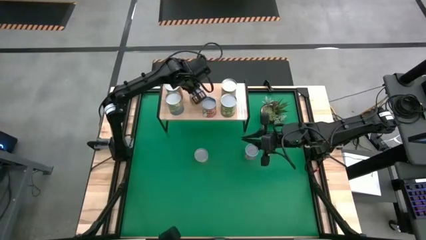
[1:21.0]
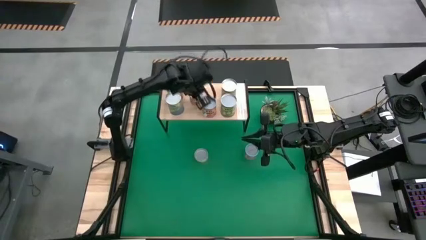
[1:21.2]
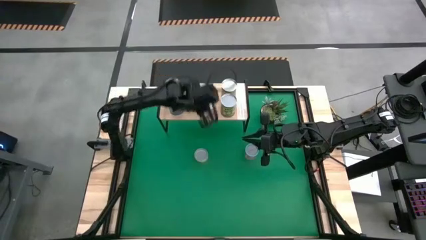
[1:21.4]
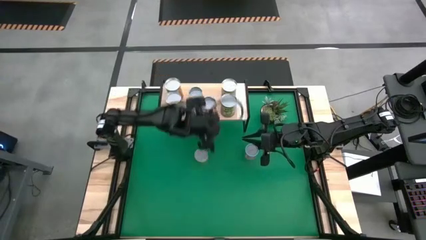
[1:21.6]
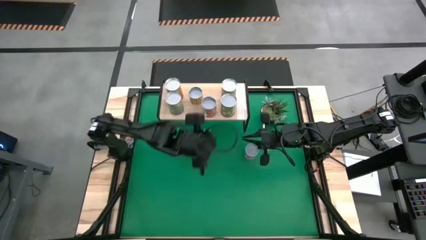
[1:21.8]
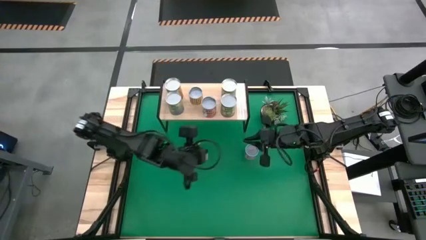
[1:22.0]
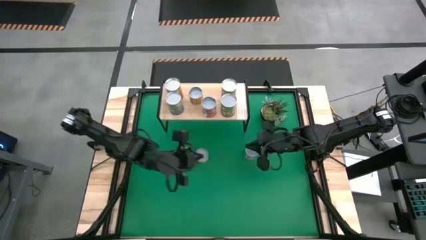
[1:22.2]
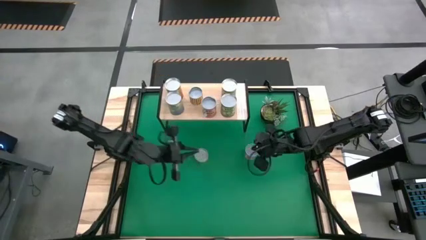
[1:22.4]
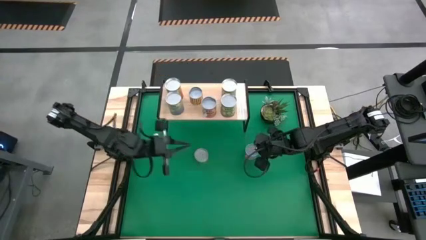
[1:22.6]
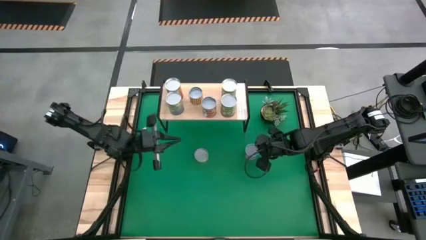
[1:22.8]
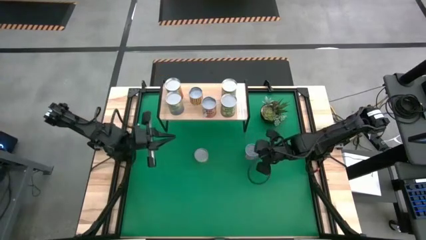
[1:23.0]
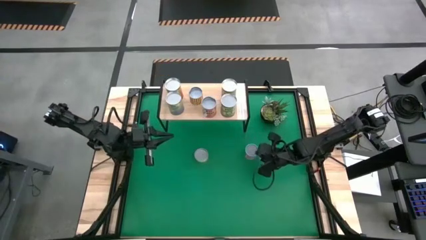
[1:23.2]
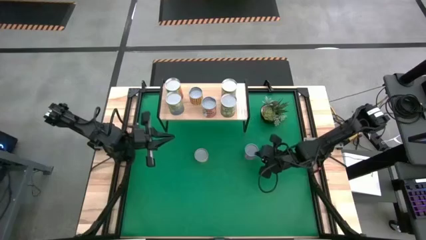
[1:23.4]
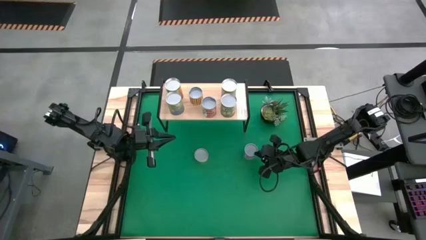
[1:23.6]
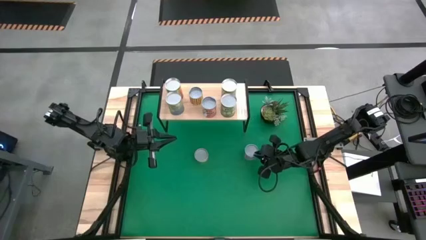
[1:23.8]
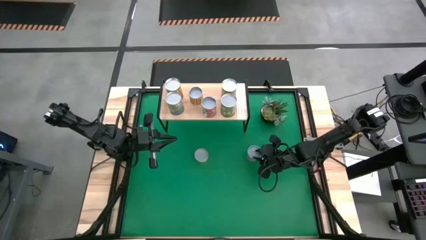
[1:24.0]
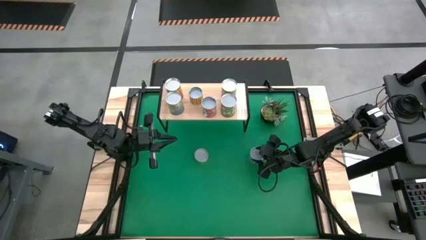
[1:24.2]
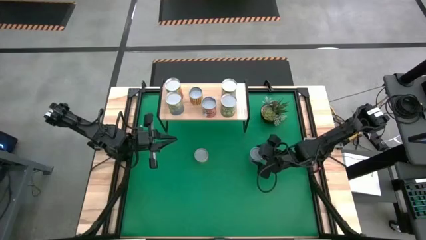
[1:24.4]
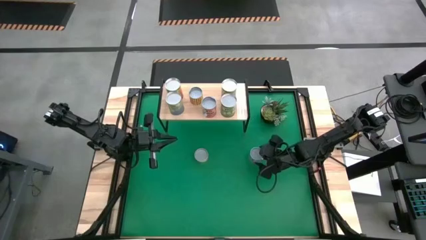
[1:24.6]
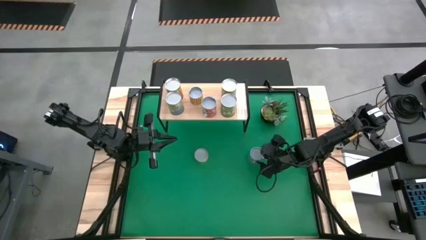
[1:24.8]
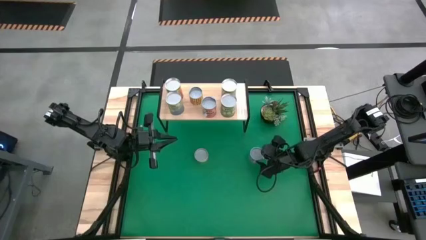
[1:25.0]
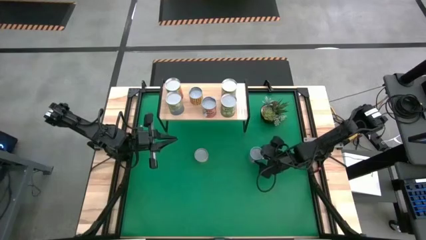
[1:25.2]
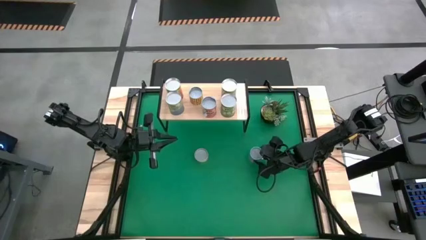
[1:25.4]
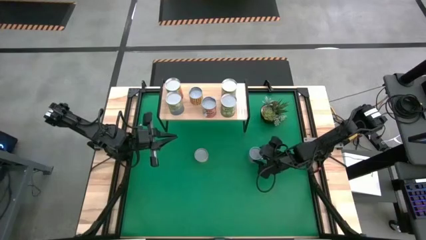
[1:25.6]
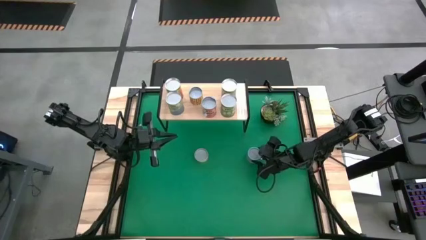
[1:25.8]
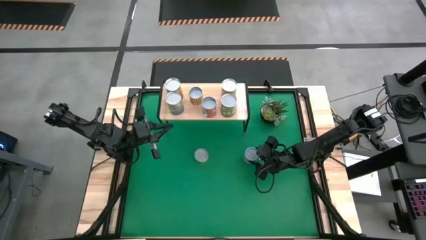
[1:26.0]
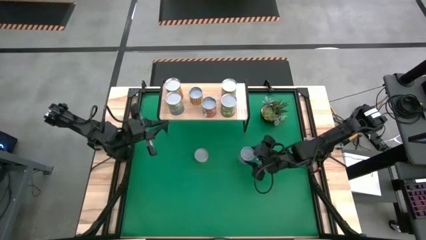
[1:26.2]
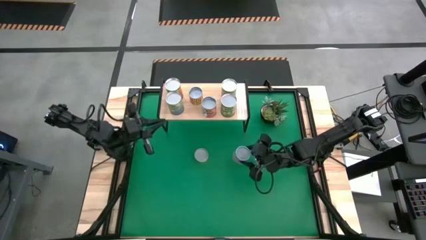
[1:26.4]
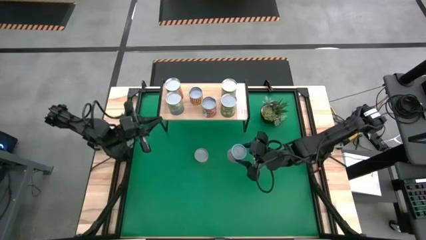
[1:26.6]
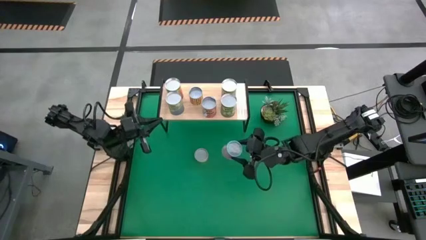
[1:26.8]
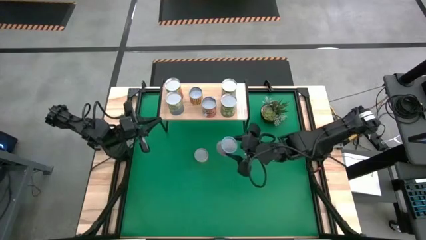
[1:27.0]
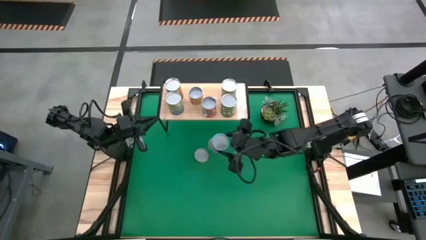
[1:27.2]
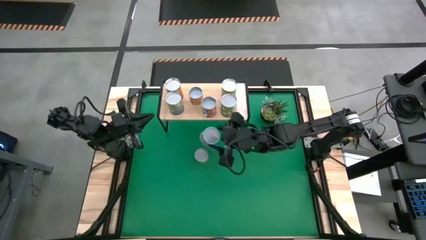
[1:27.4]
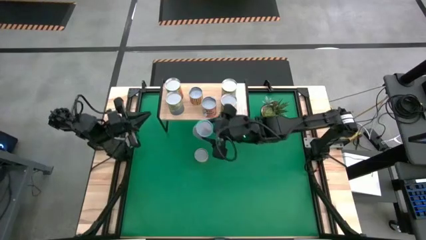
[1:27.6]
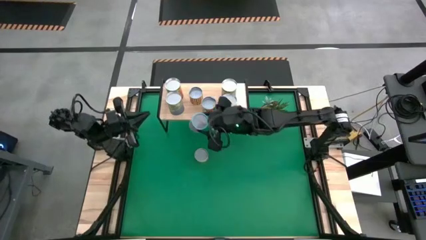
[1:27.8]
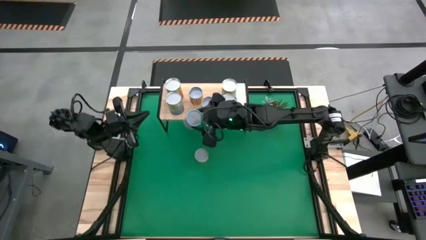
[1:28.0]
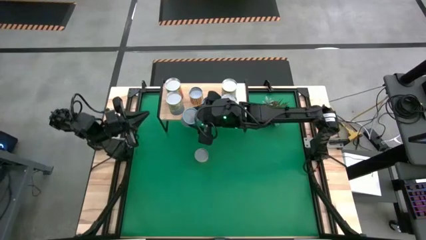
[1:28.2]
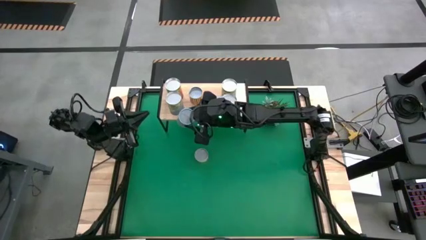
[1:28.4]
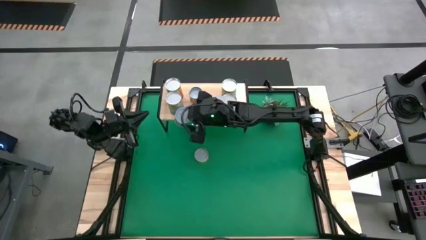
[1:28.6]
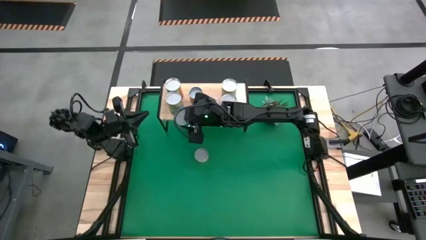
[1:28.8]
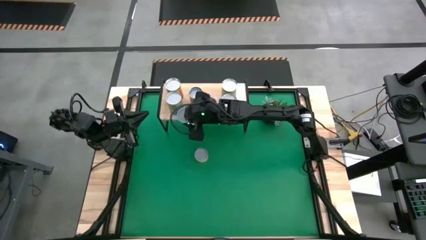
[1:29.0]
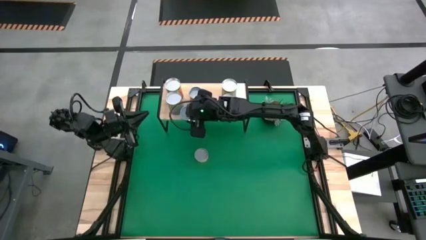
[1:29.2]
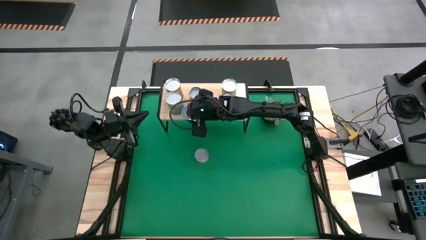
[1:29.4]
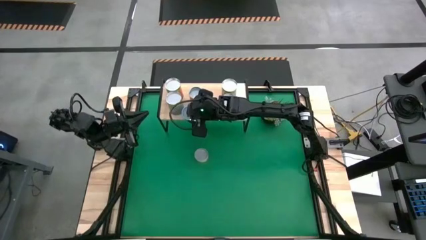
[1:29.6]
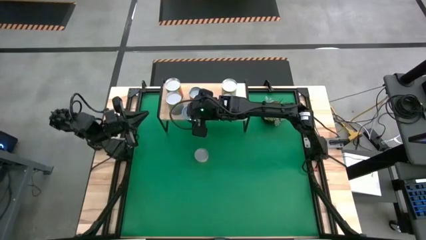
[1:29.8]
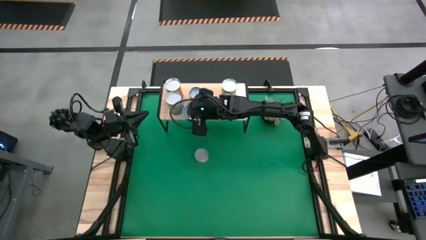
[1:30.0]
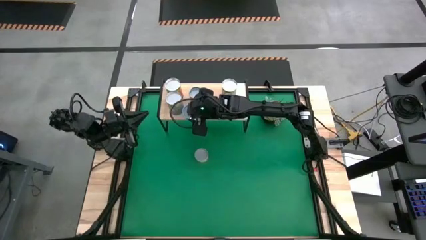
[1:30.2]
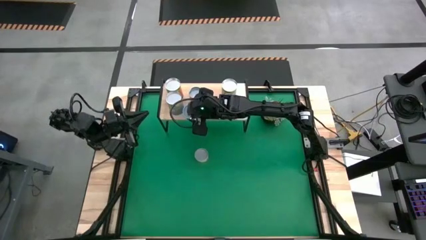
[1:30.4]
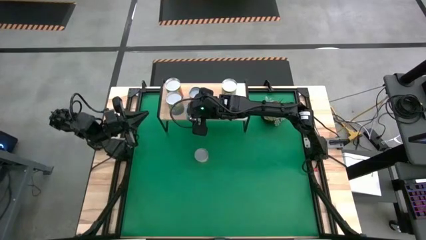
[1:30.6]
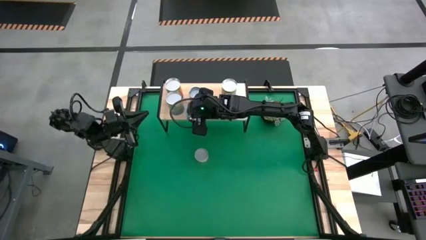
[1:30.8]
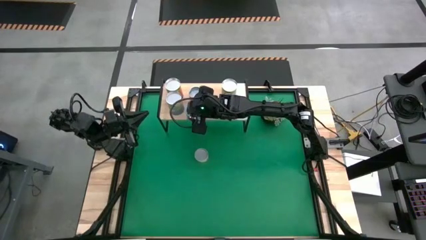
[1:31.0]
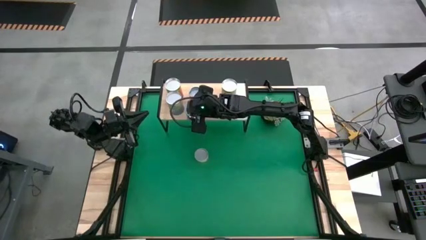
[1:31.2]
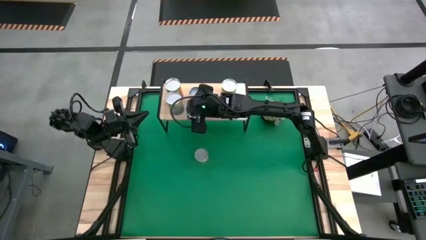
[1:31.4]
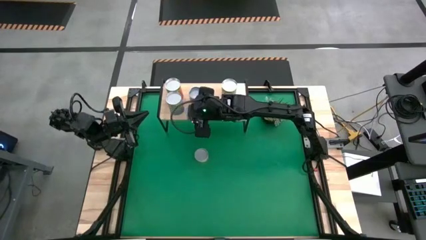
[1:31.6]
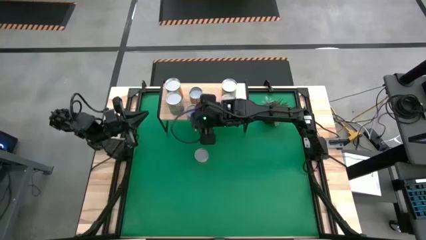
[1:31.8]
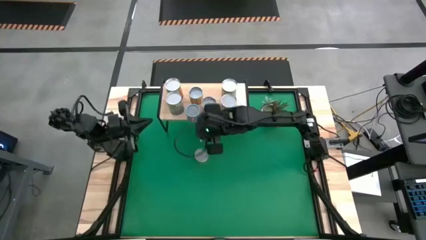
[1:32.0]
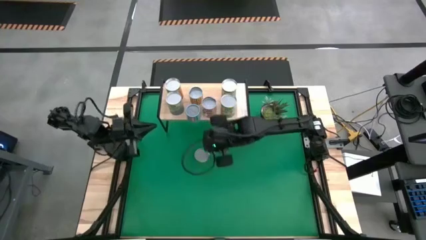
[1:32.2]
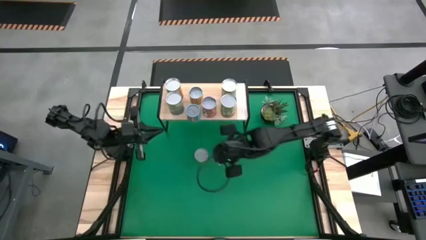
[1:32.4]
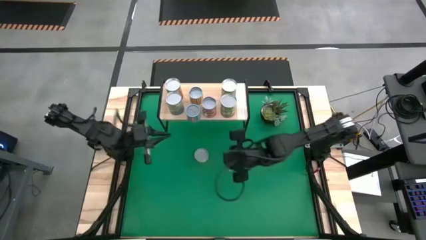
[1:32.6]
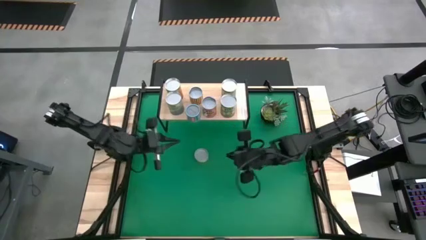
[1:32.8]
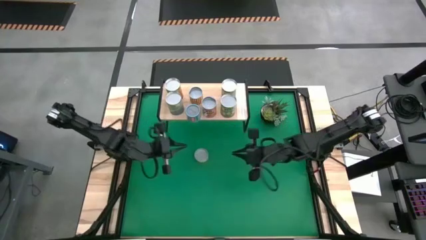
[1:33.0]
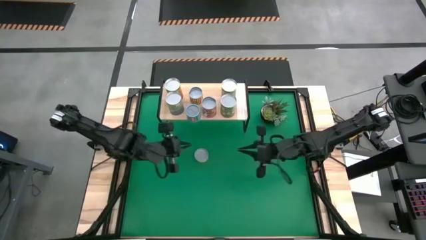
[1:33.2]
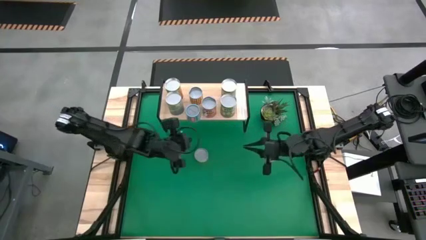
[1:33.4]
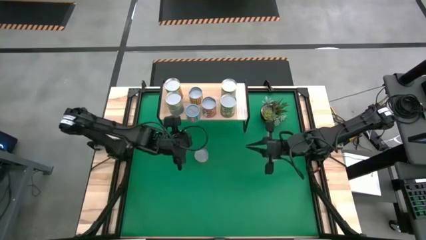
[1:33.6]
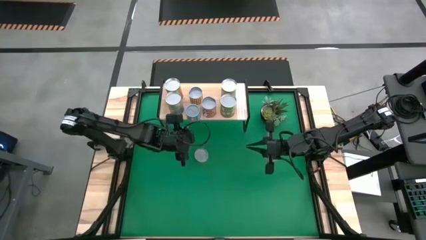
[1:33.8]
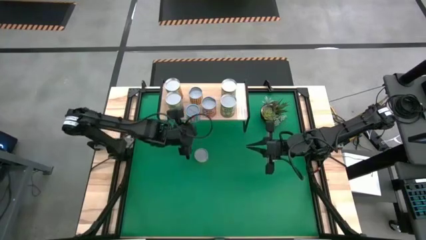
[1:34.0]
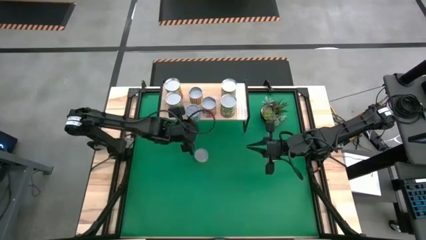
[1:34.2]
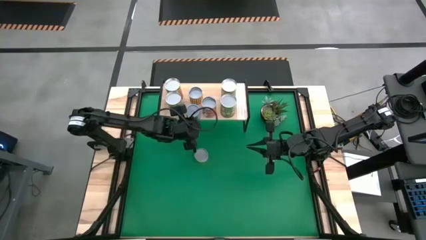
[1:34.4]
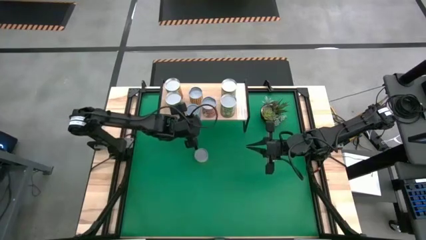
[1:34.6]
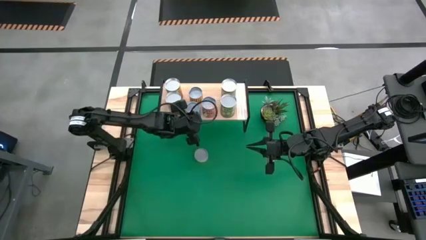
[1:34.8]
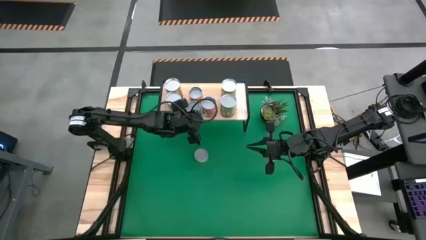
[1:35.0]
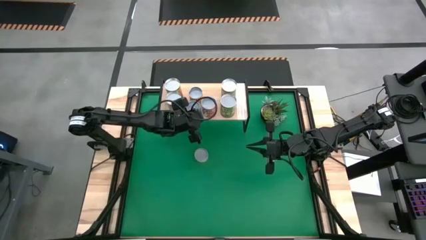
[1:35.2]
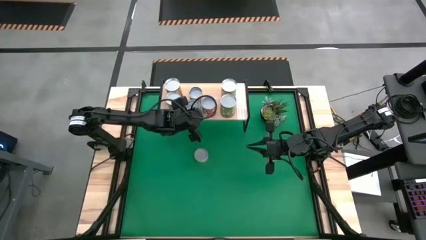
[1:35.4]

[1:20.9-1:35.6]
Task: Pick and place cans onto a shelf
Put the small blue can on the shelf aligned with the other small yellow can
